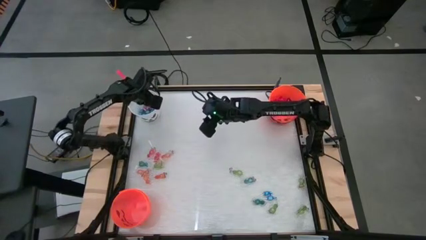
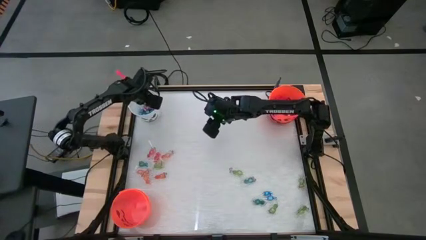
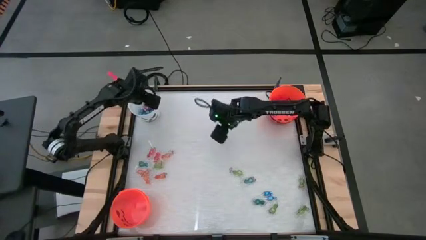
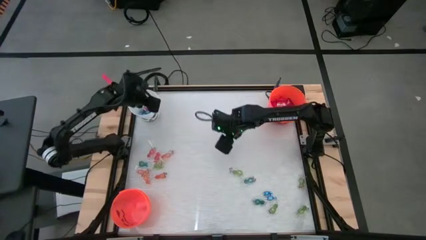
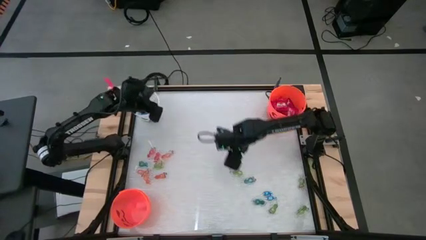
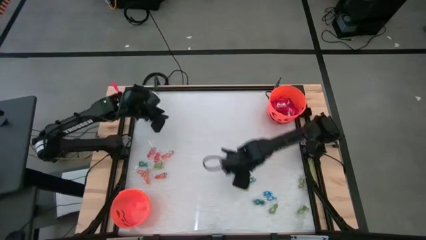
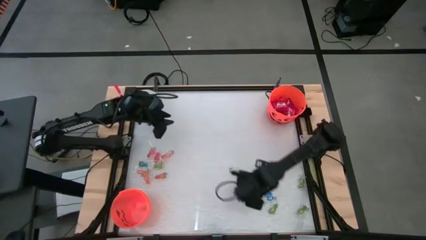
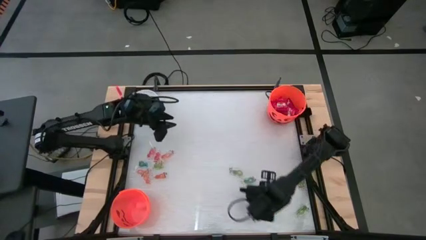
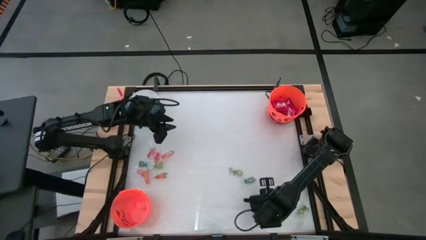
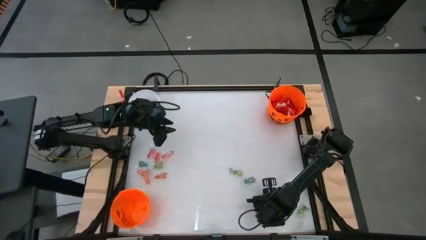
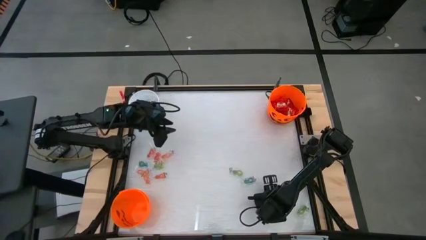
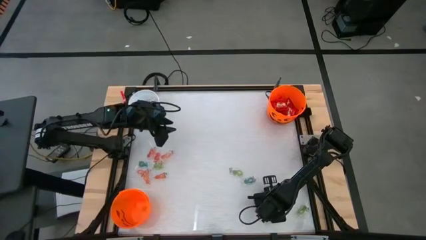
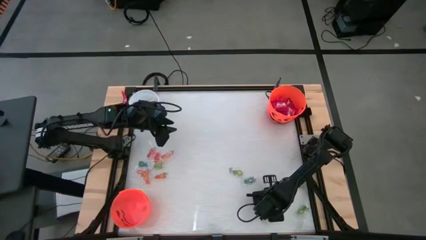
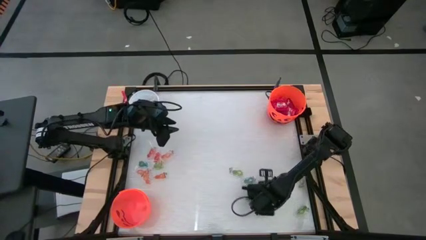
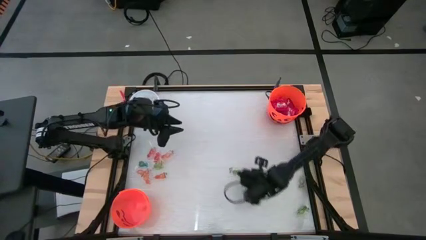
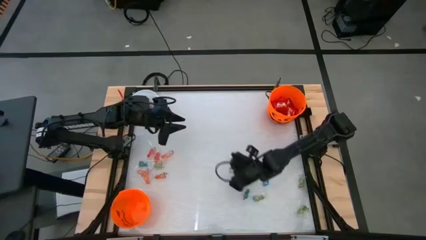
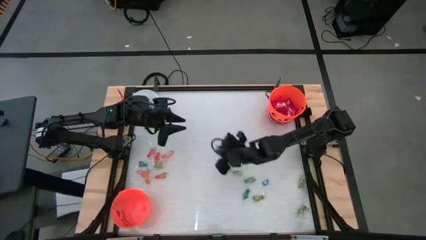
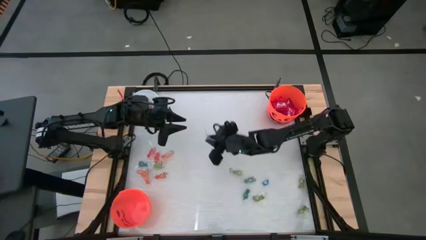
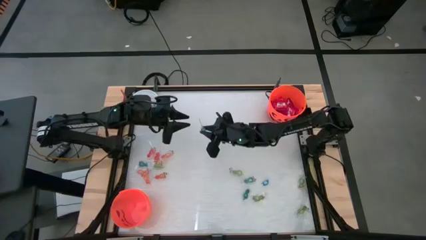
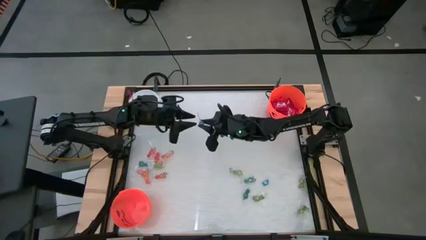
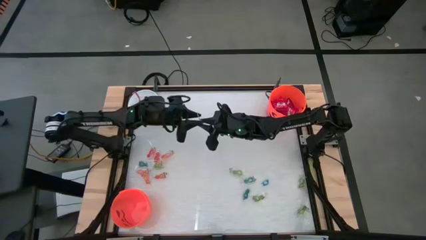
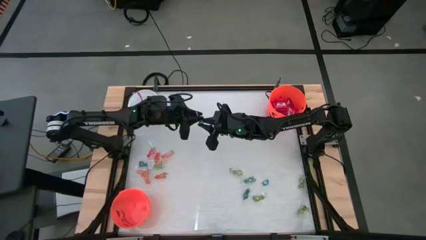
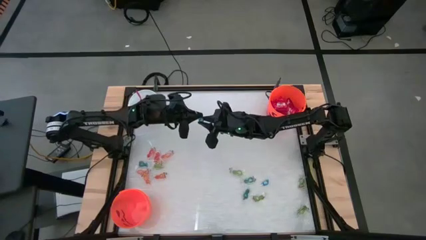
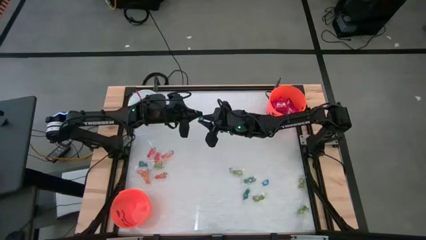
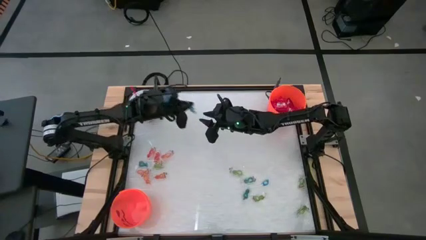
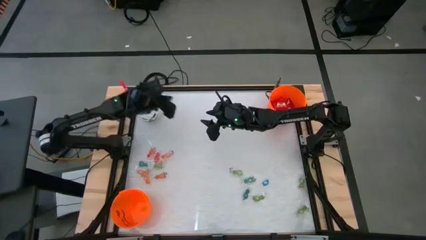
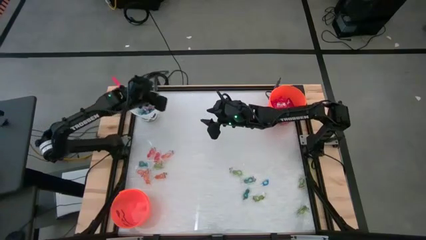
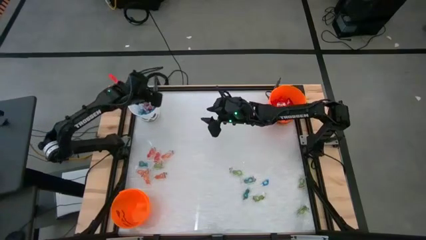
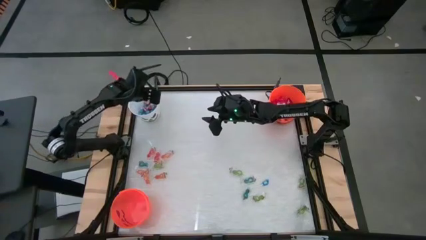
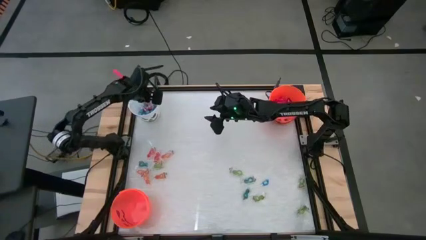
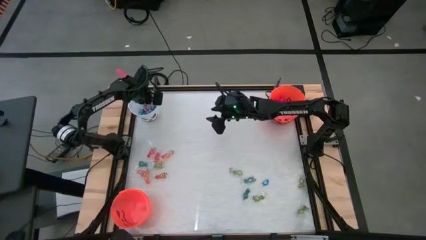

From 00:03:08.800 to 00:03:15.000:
Task: Sort candy by brand, put in halloween buckets
Put the blue lollipop into the white bucket

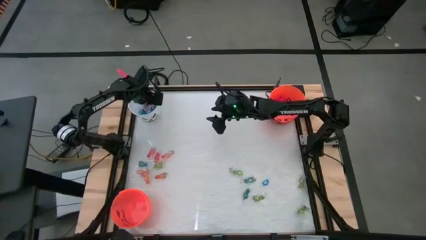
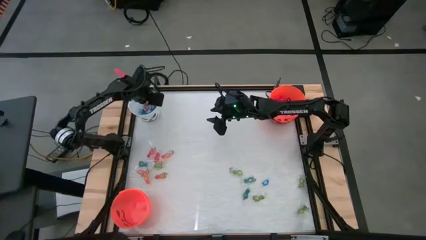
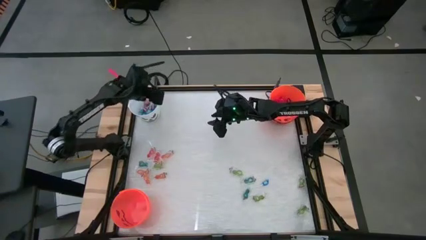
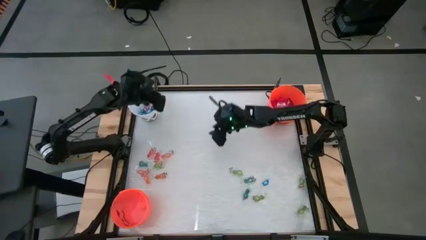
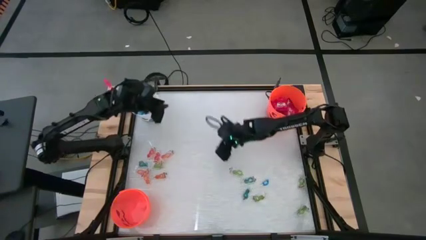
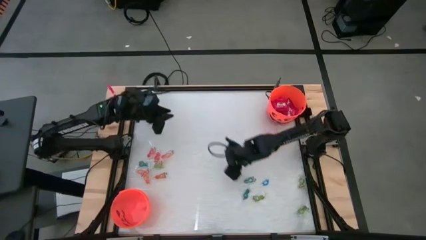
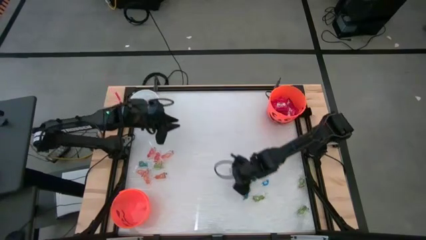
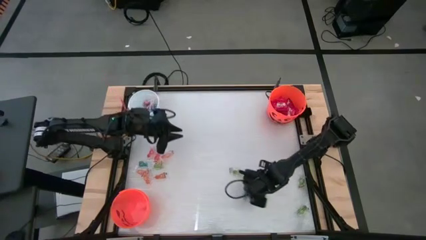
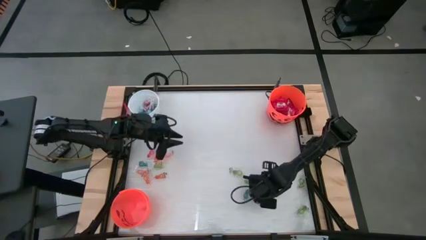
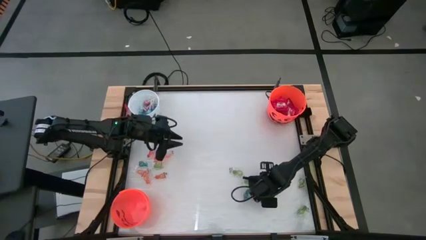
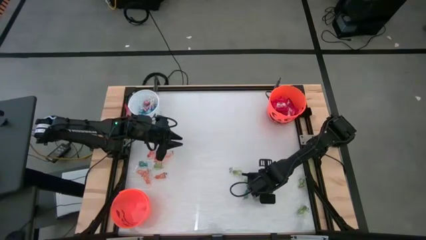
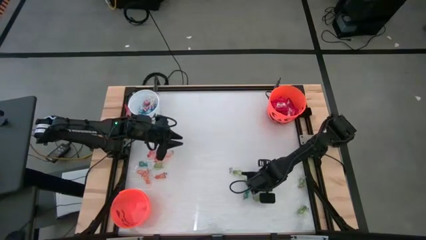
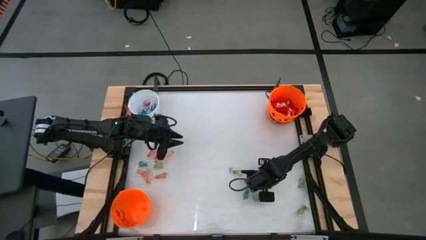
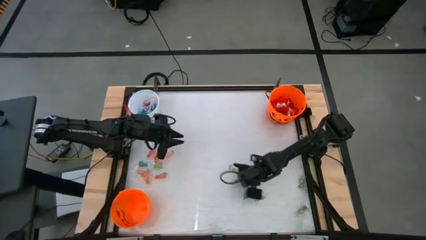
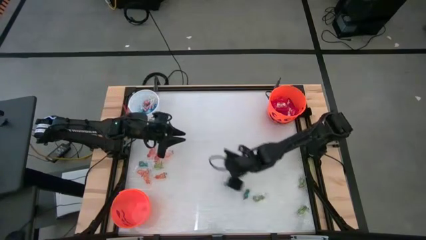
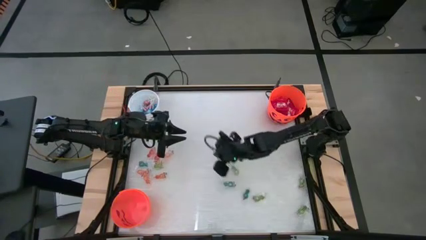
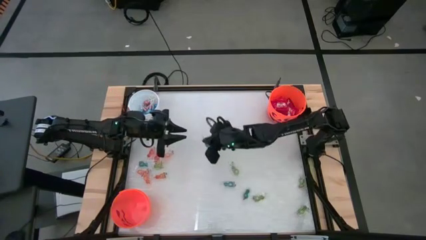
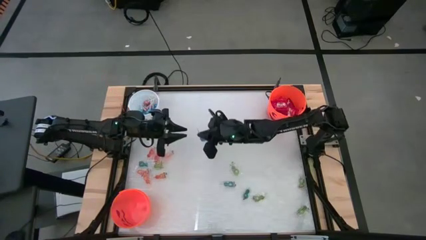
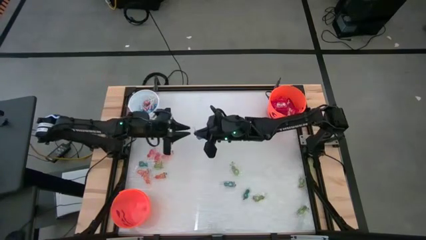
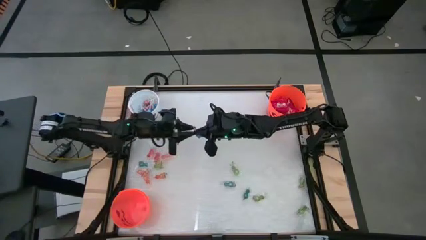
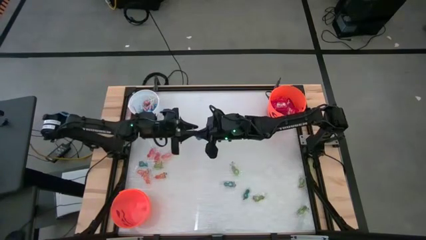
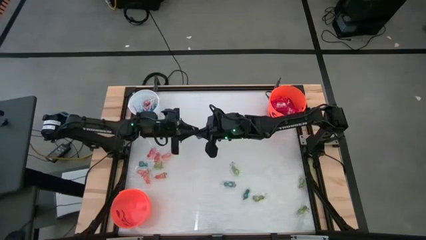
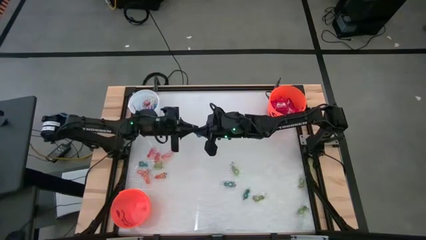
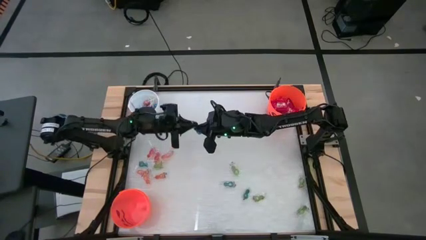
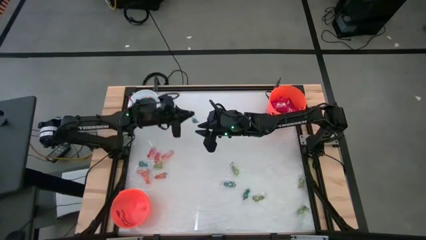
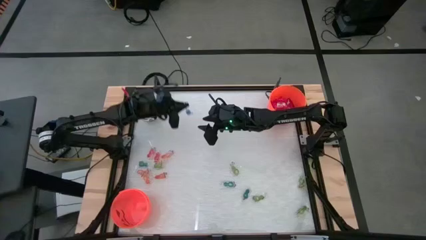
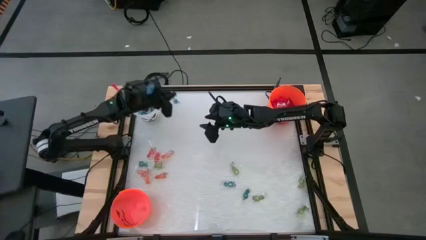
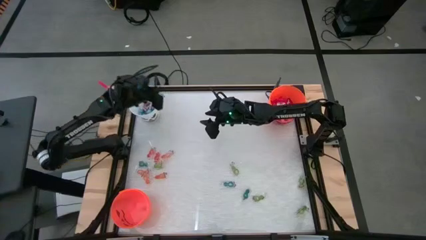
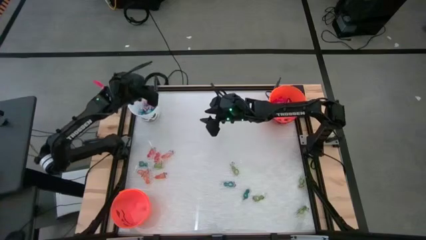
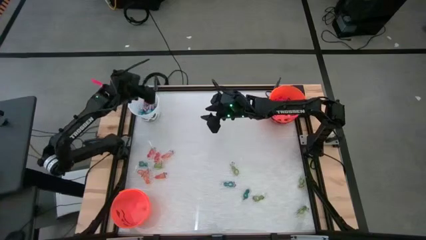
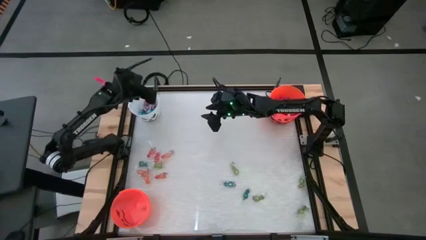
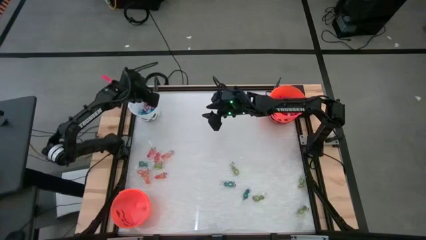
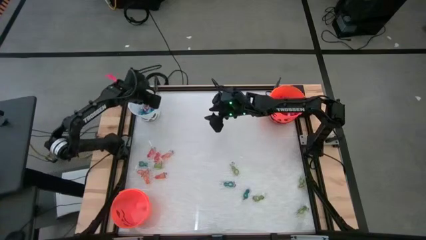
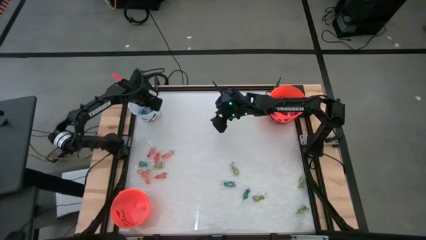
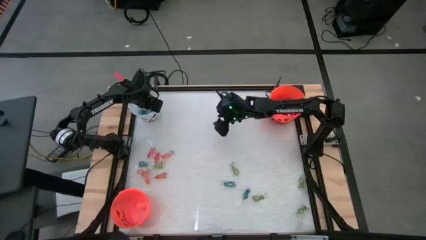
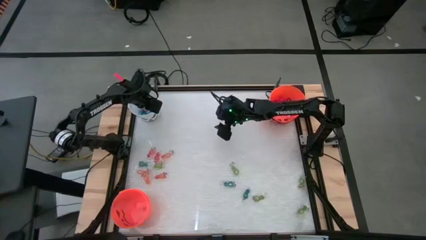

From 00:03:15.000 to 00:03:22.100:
Put the blue lollipop into the white bucket
